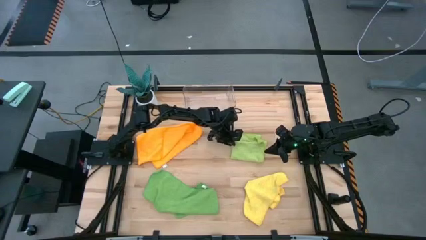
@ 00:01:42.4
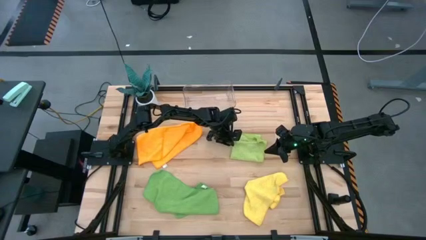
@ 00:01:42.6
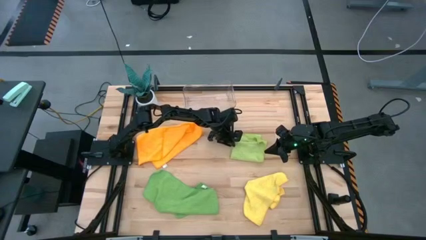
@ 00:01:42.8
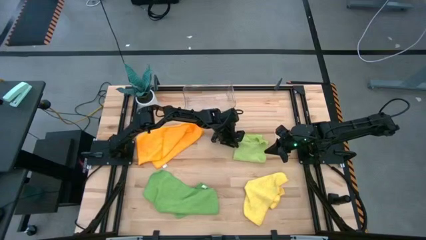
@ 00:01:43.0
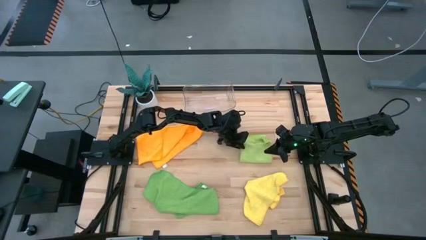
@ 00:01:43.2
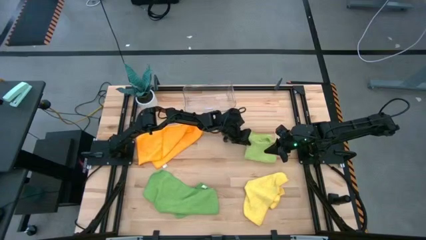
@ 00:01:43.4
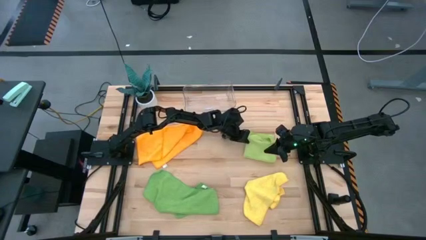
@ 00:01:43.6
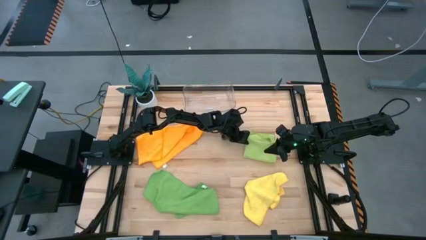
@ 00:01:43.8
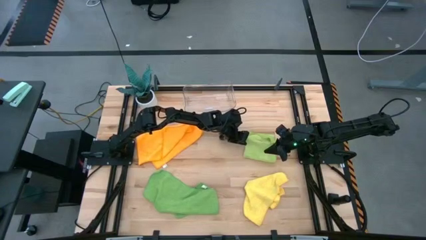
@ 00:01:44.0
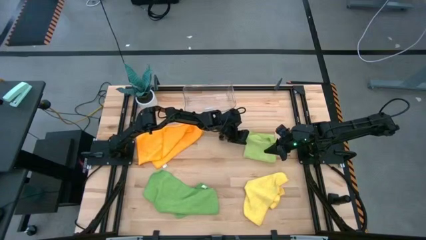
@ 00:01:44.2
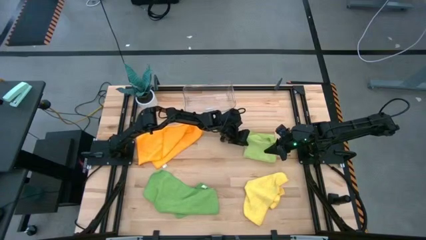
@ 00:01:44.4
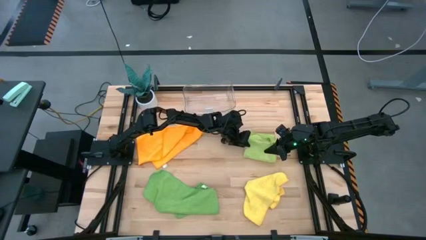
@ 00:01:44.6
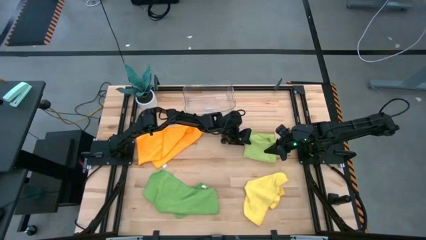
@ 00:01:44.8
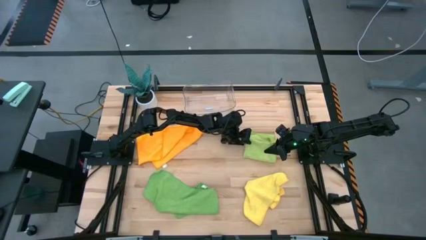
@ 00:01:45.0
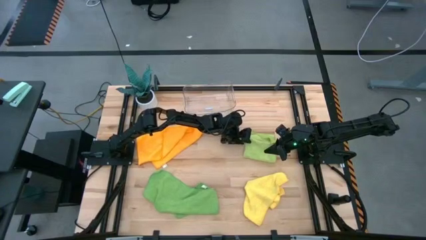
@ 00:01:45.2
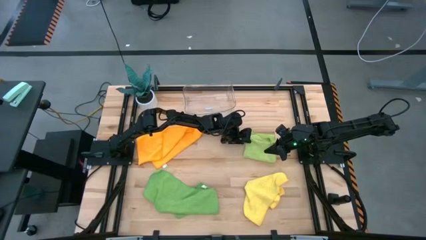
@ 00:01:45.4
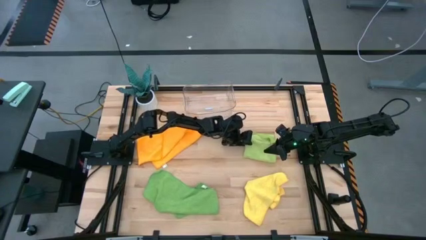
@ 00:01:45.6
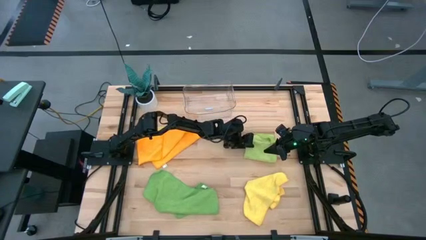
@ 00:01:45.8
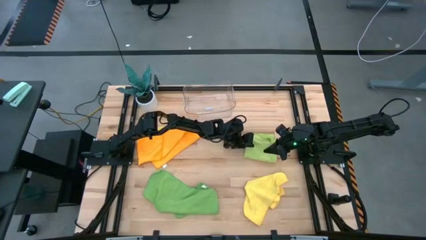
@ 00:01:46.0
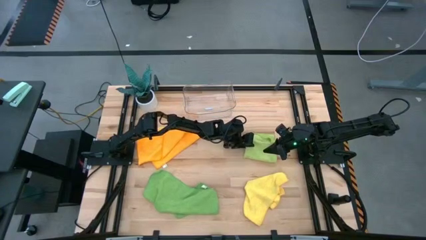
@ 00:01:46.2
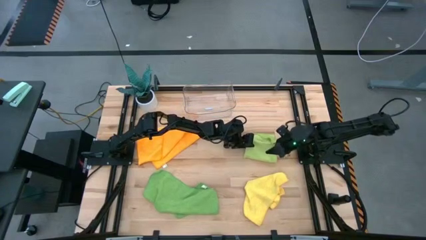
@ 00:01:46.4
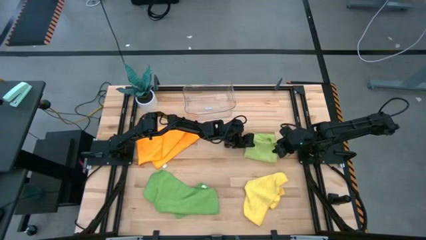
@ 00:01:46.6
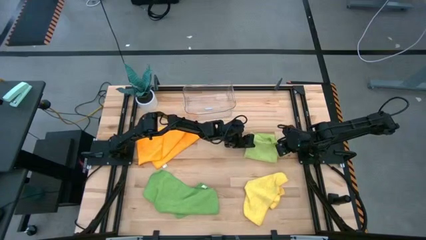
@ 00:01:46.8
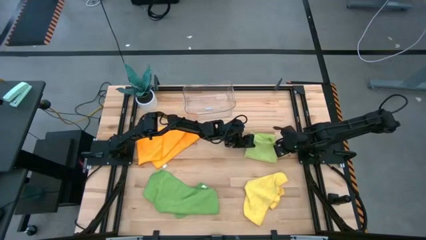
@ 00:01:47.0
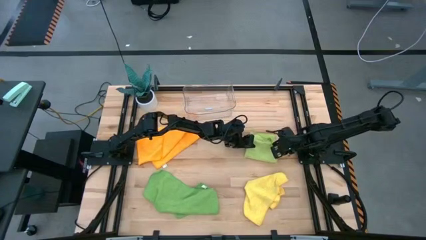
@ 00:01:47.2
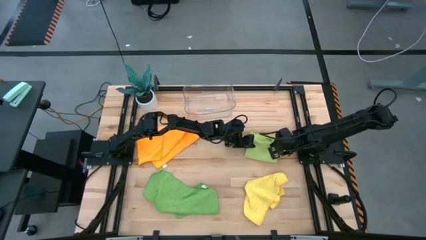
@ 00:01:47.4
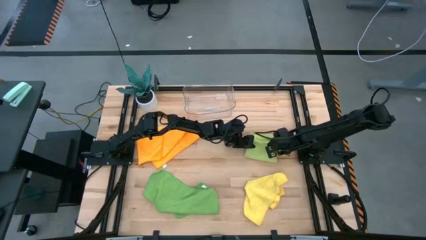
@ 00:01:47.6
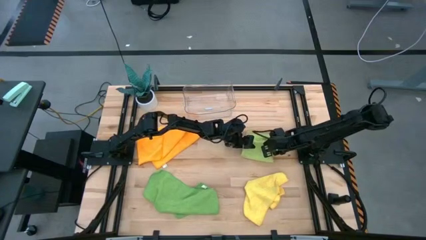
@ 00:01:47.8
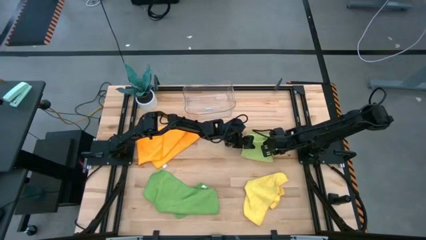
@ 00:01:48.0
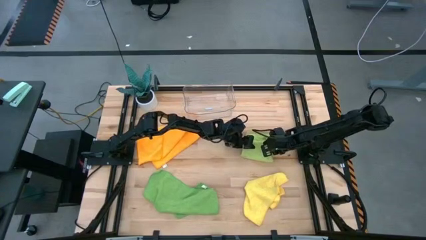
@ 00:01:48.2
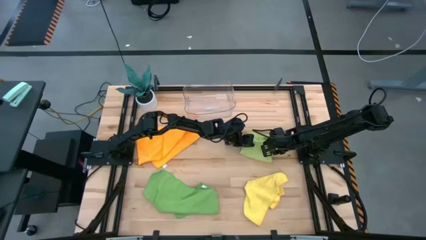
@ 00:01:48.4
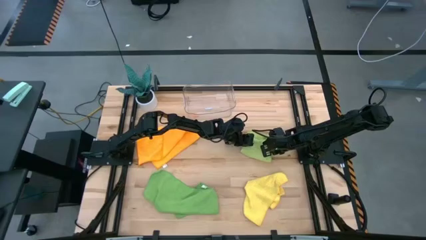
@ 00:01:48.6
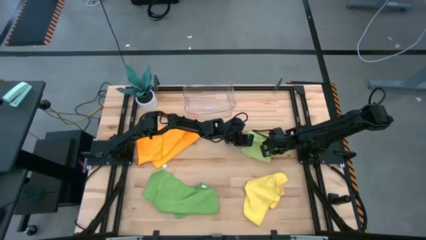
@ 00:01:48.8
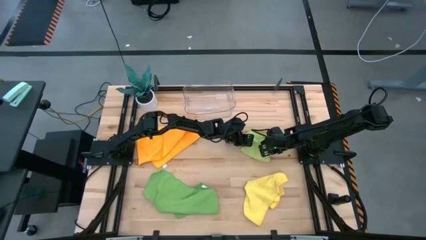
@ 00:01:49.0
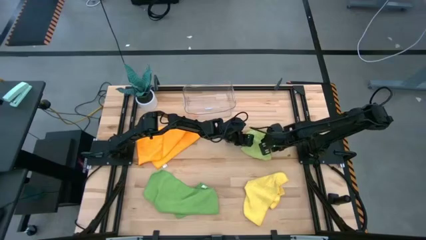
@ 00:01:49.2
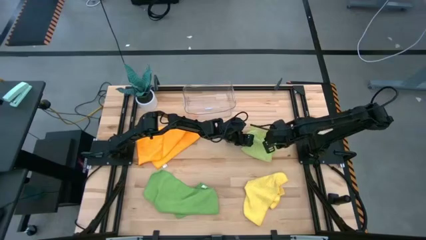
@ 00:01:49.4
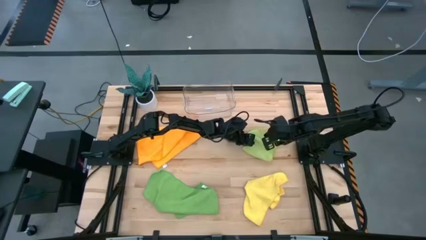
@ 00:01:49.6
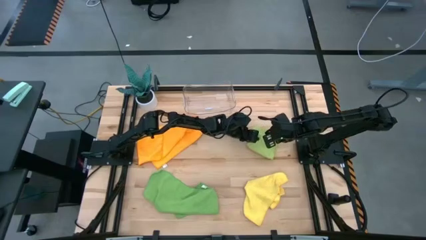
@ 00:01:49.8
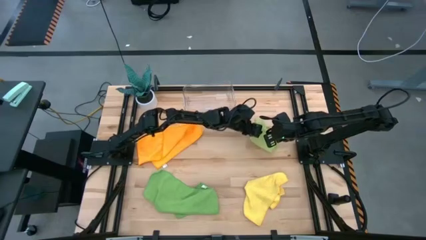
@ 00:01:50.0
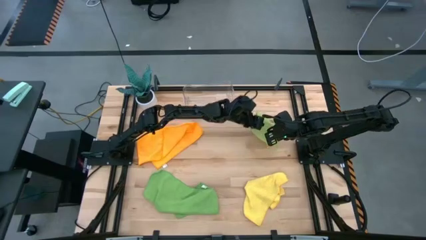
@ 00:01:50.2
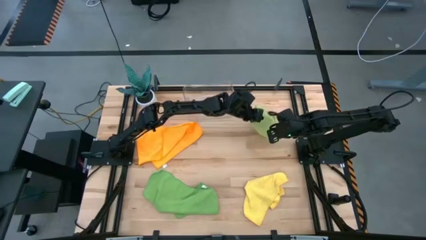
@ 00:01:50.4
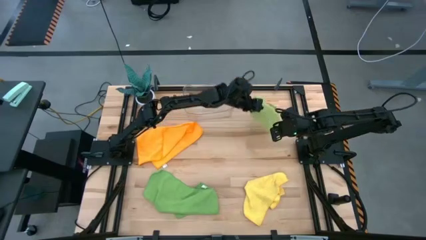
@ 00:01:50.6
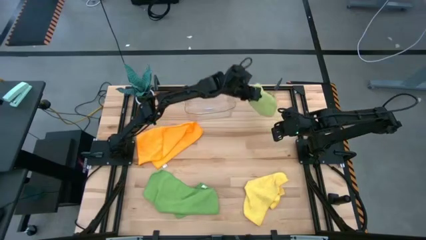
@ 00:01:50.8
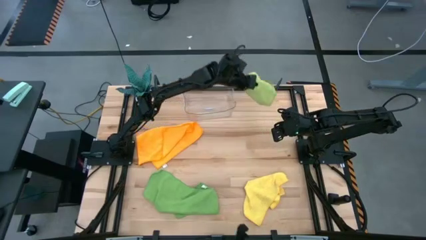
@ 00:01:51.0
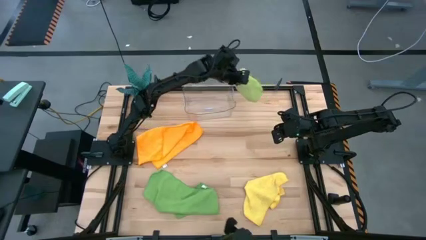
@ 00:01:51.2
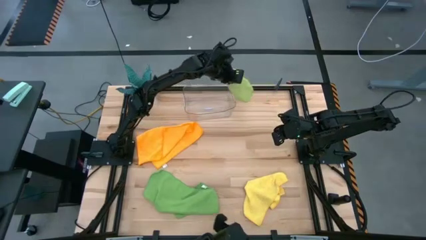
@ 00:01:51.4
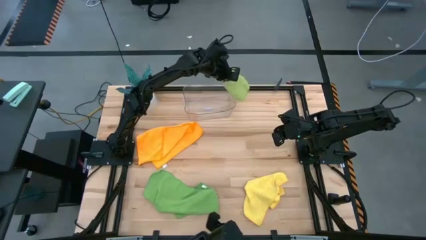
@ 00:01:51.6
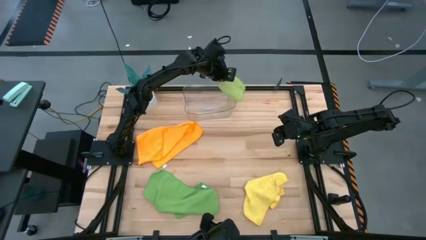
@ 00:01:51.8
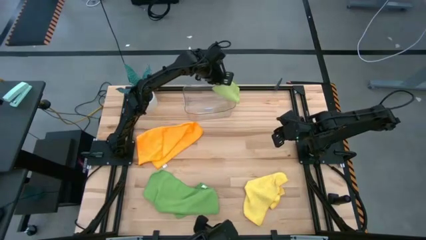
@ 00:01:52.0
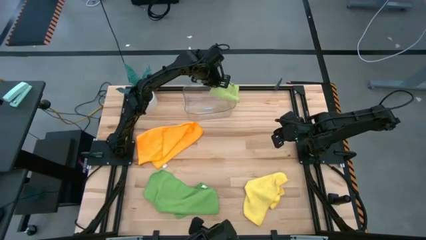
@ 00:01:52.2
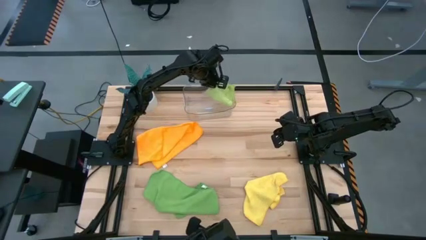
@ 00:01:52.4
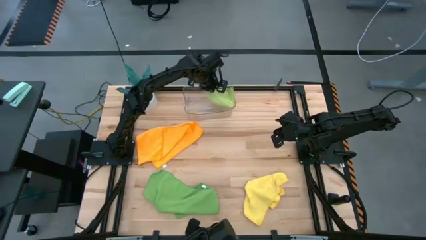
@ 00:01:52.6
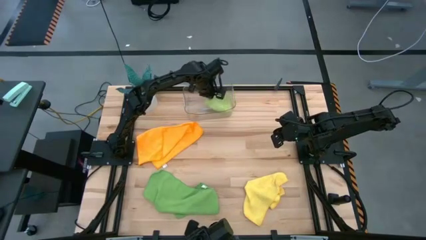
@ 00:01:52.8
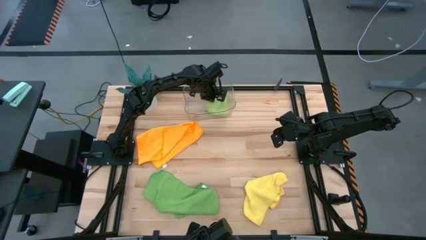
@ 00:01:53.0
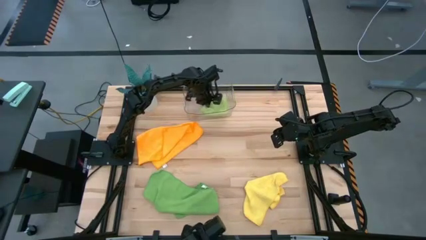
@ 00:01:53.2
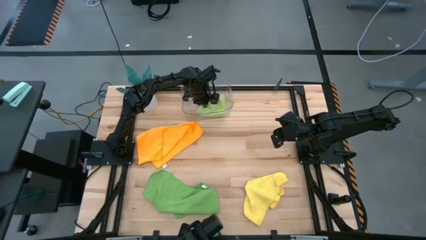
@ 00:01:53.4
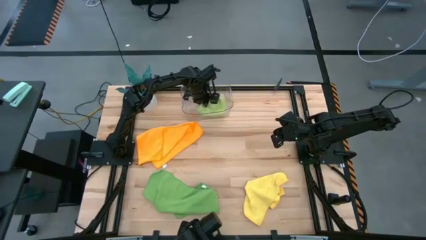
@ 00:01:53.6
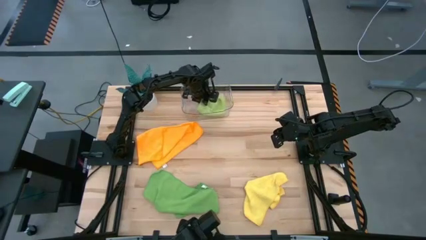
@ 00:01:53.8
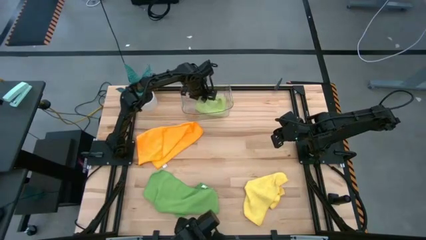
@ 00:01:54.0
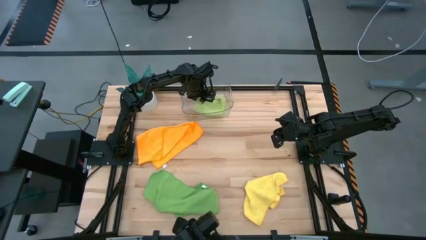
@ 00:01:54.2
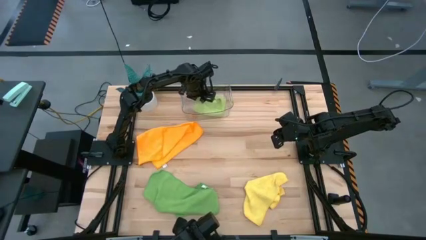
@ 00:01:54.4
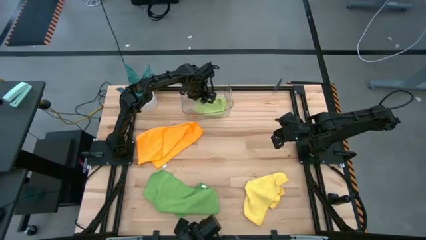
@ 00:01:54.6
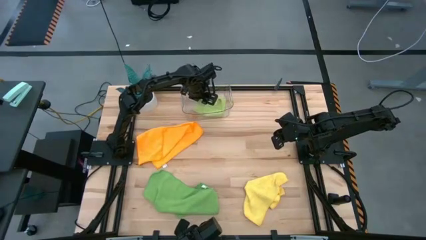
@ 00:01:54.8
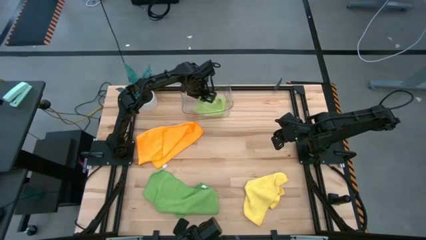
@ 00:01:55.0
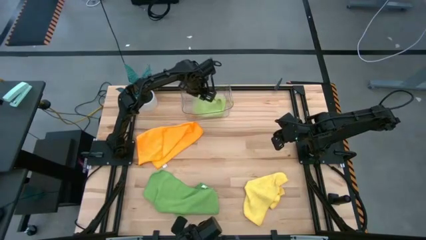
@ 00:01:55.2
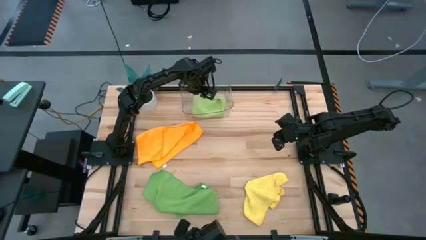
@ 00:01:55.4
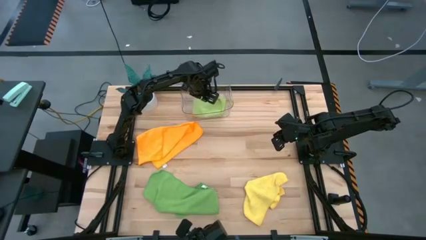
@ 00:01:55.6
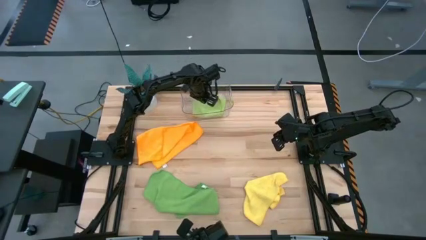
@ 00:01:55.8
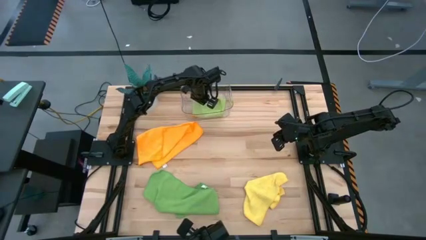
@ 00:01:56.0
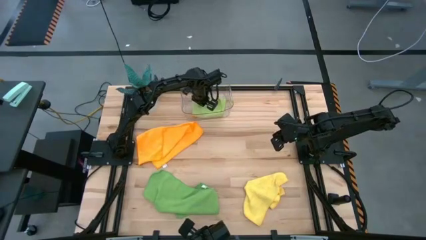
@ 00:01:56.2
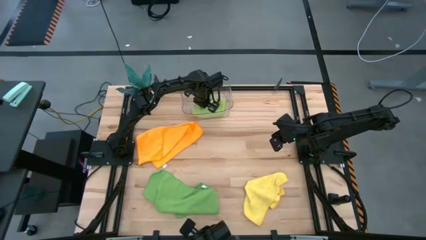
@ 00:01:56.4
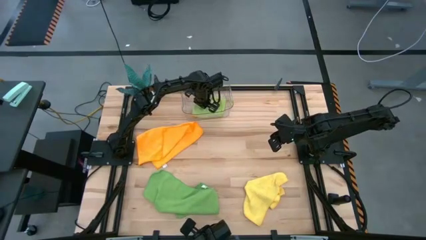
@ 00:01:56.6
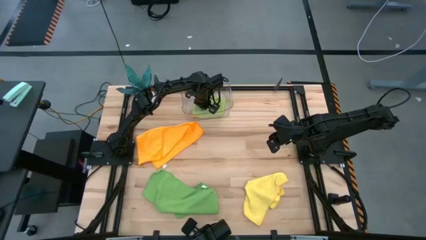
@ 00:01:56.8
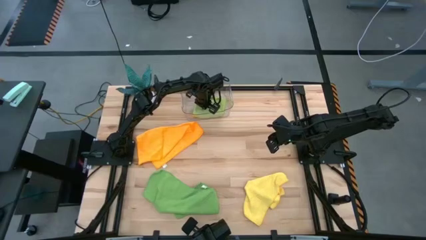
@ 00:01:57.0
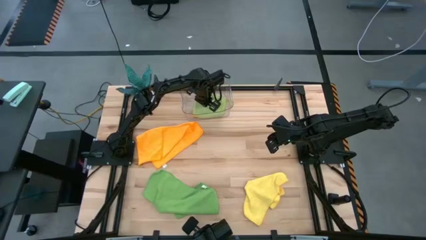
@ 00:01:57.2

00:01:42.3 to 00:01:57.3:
Task: Fold microfiber towels
Put the light green microfiber cloth into the transparent bin
